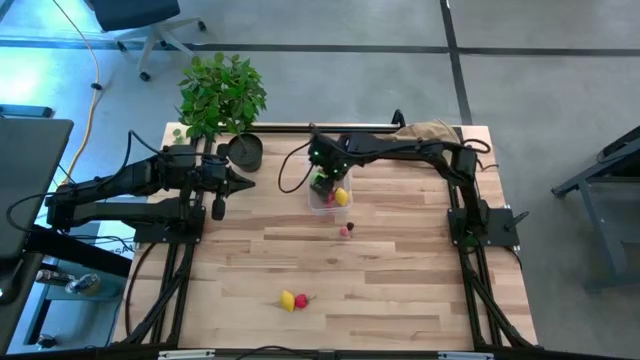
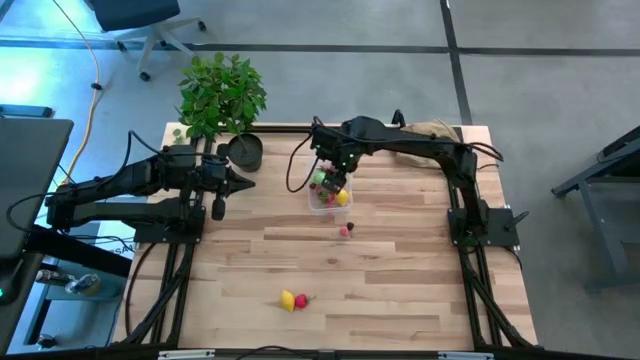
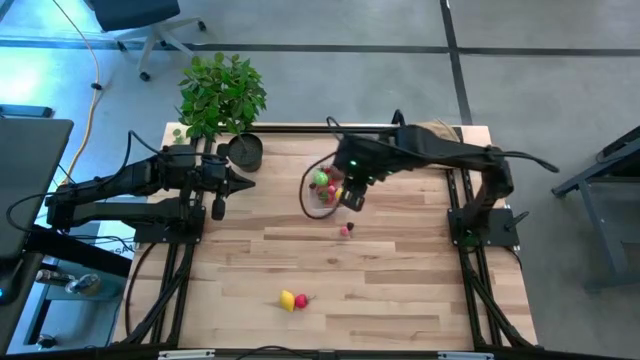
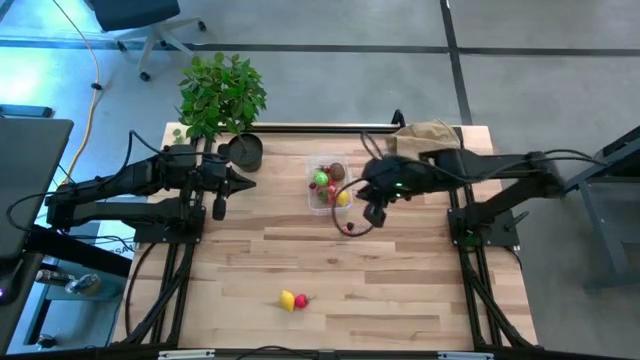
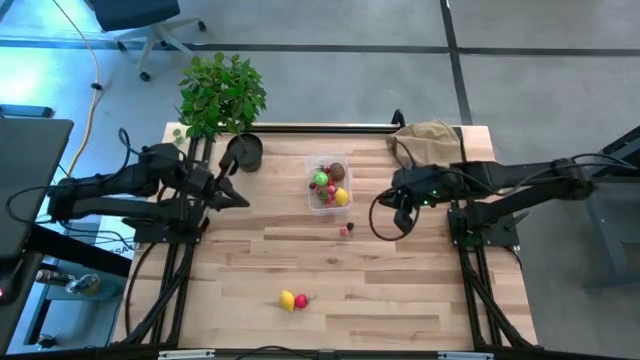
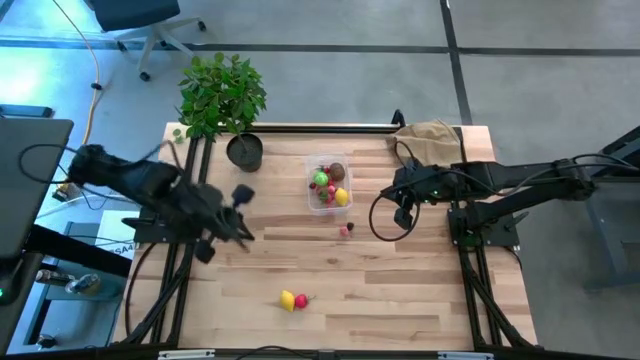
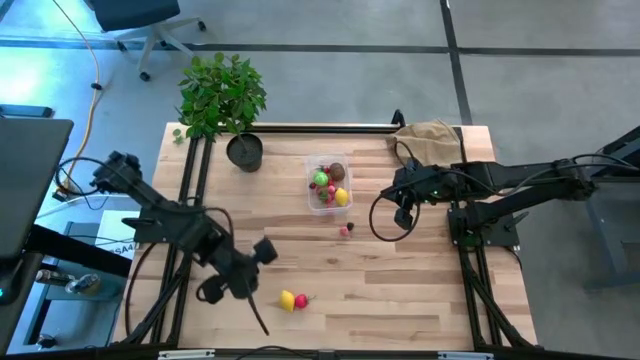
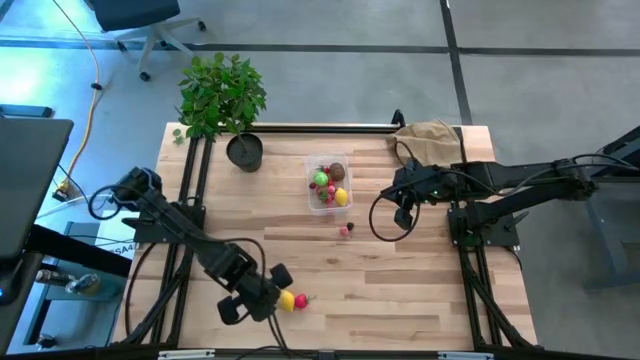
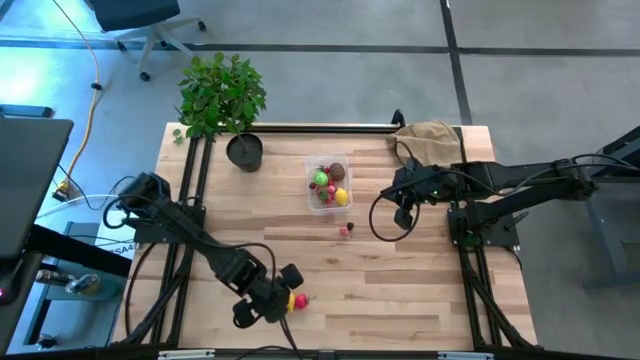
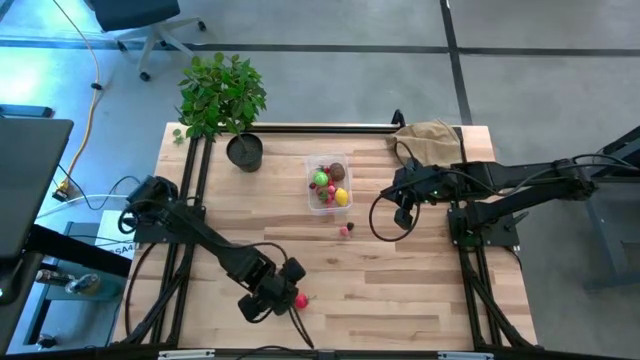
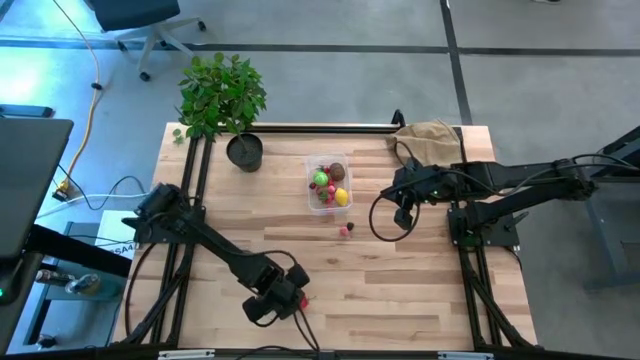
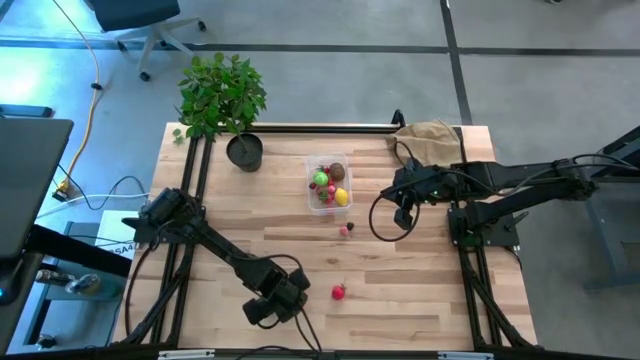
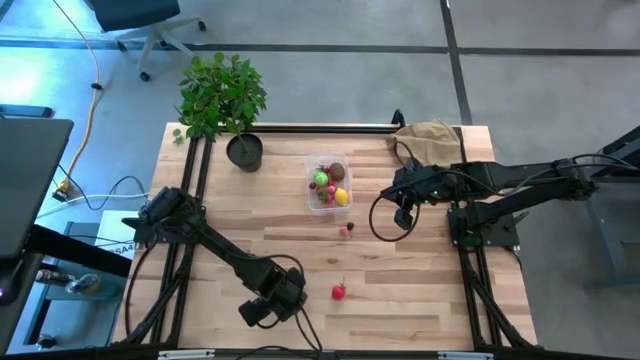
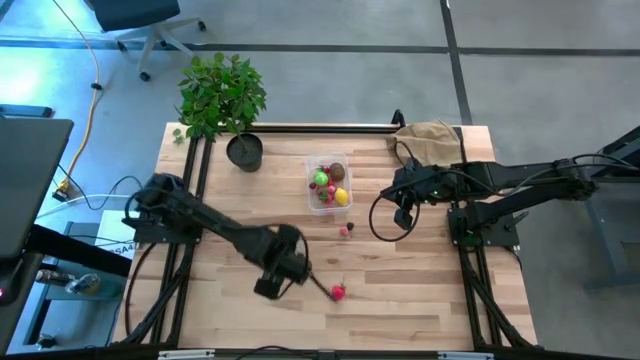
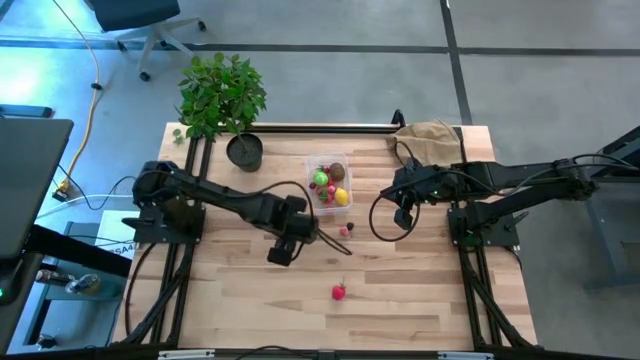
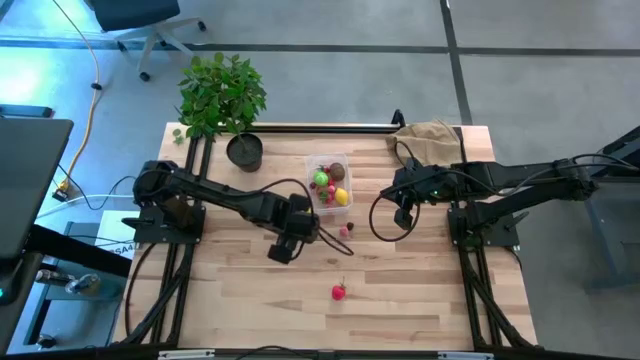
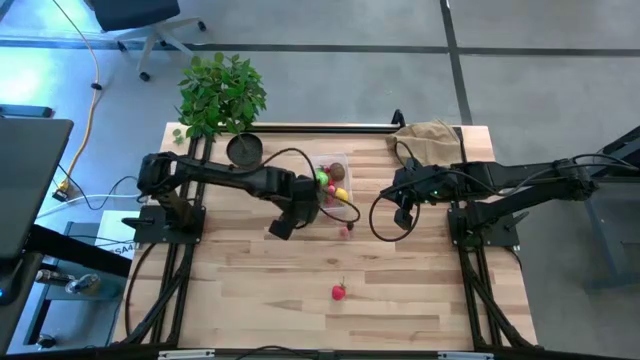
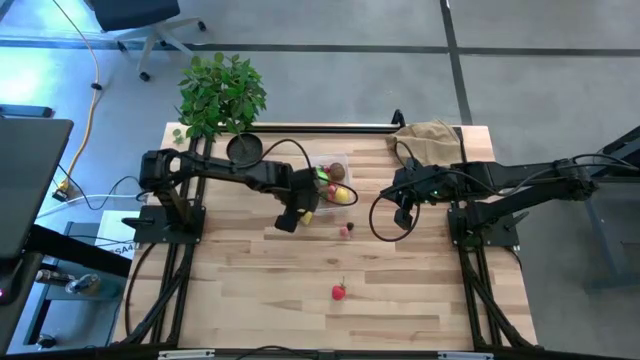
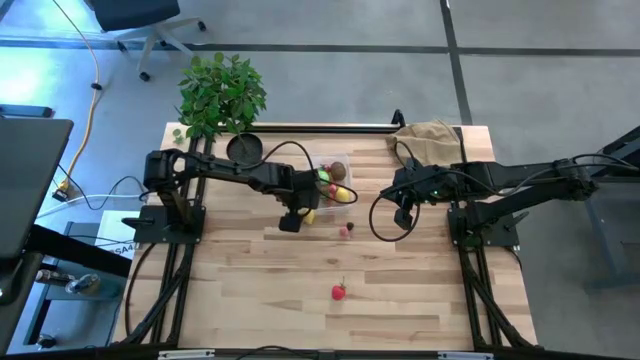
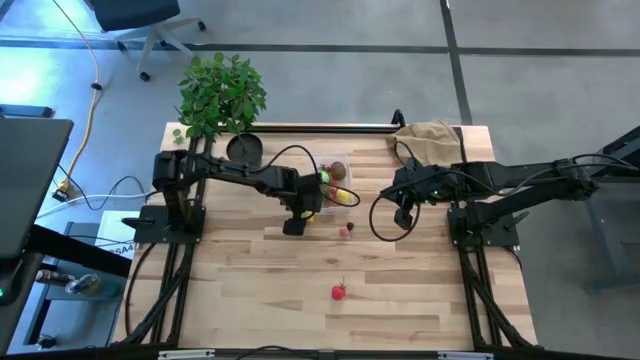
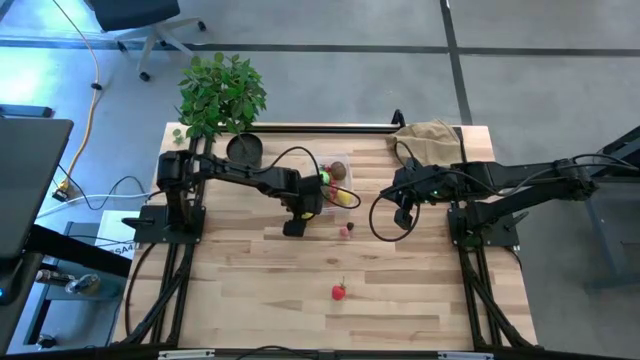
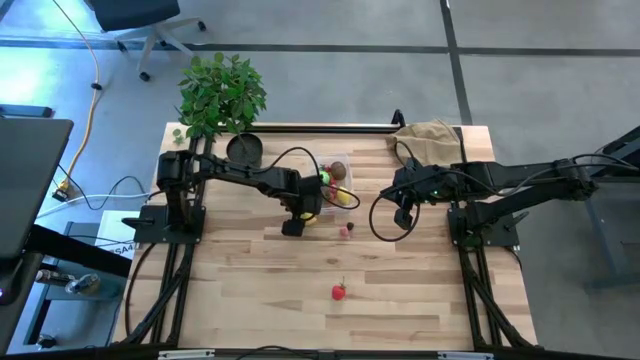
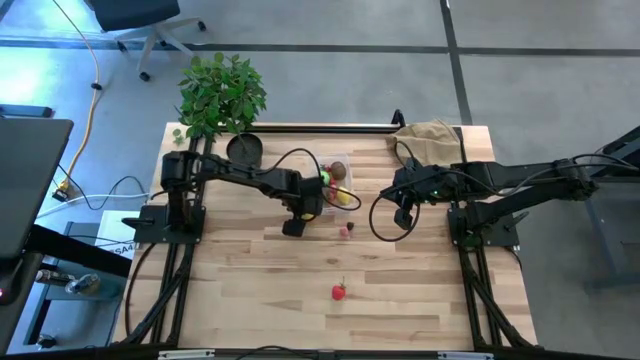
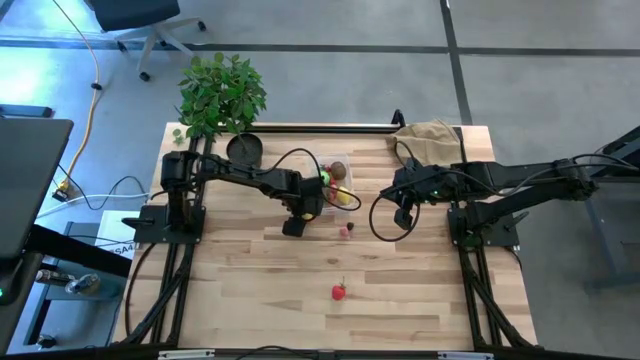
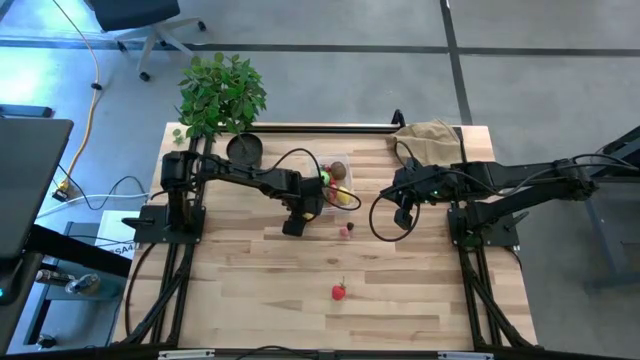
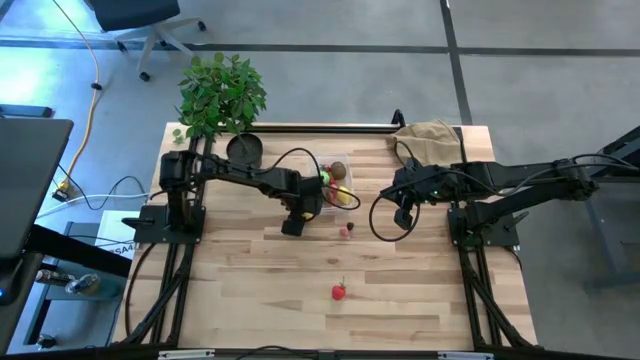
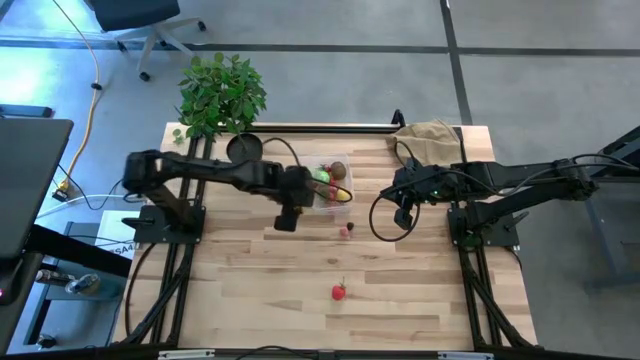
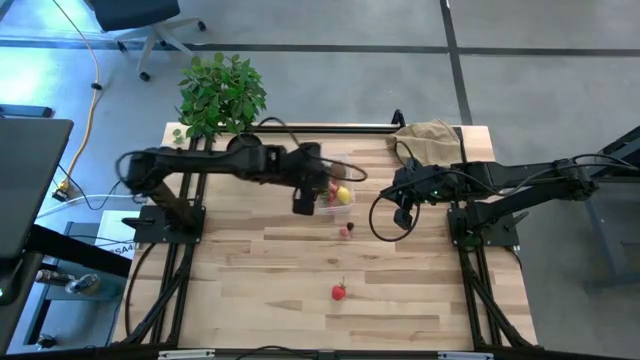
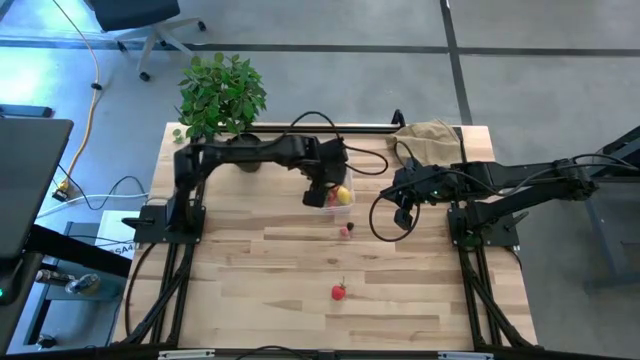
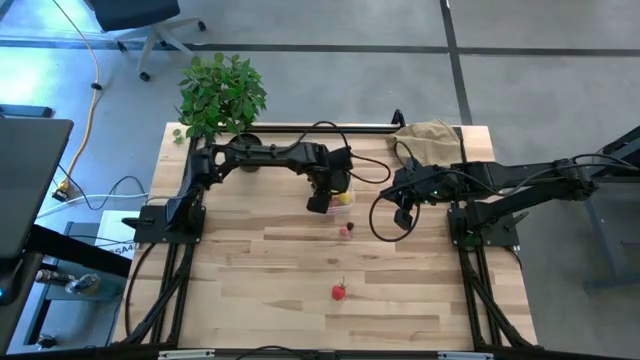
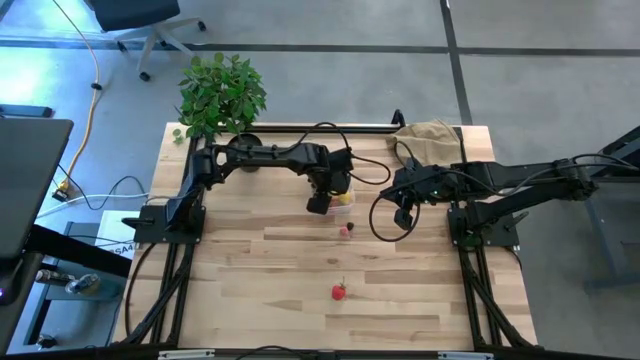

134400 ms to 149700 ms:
Task: Pick and placing Produce into tupperware
Put the yellow lemon into the transparent bin

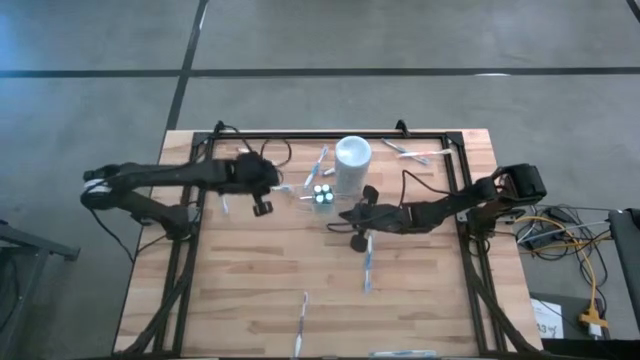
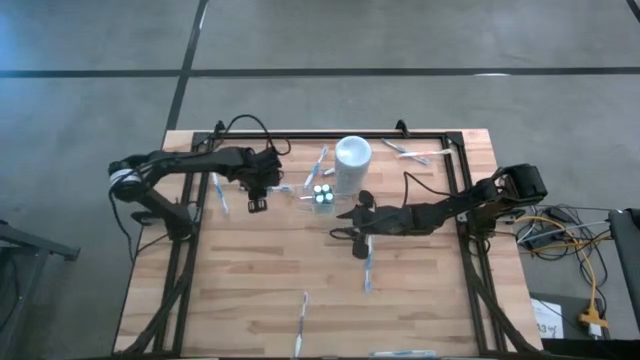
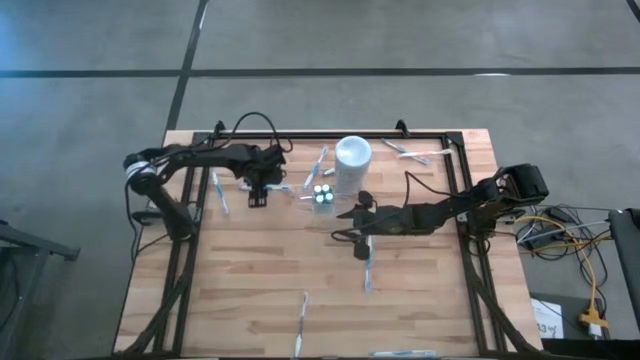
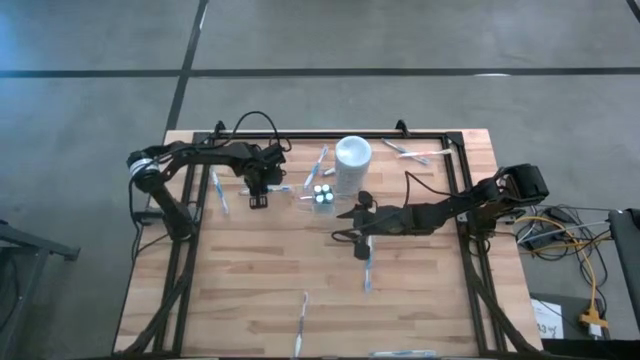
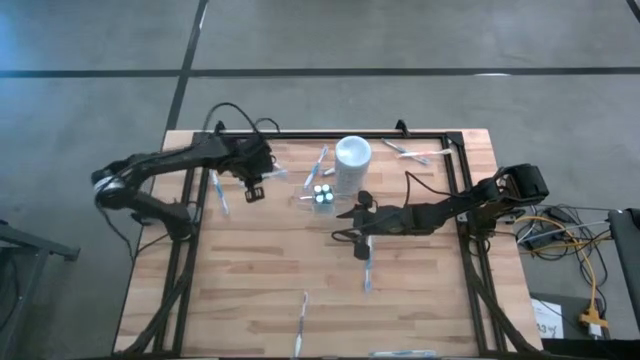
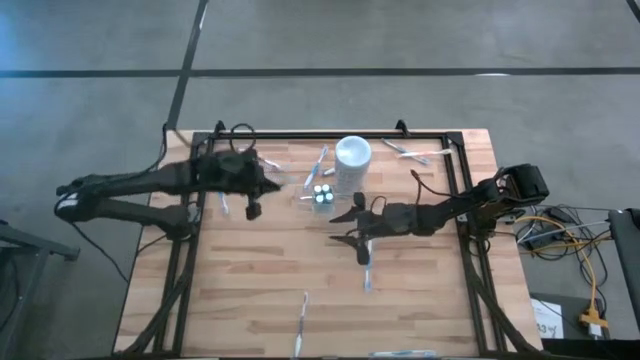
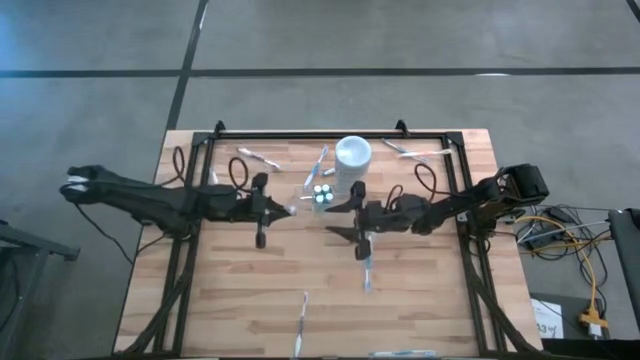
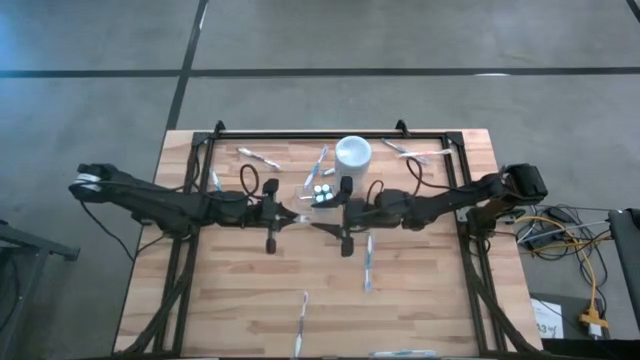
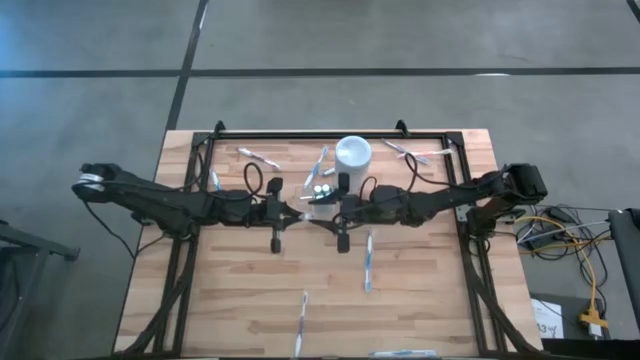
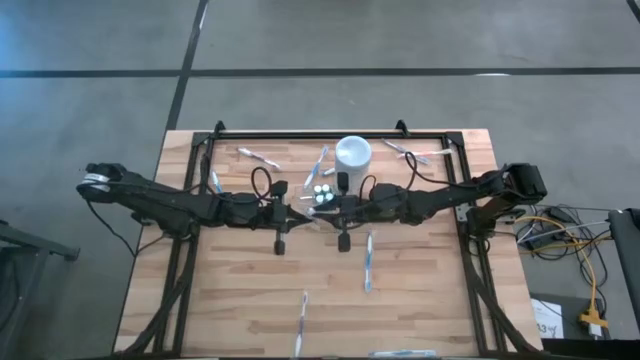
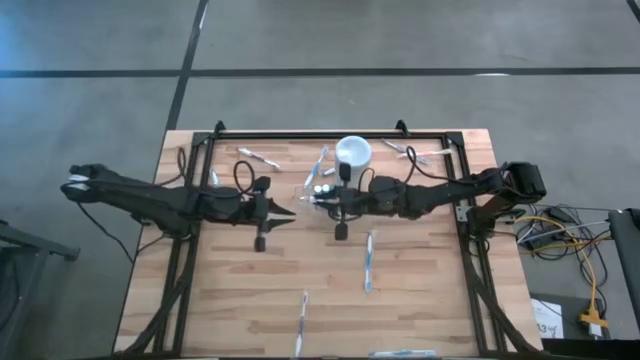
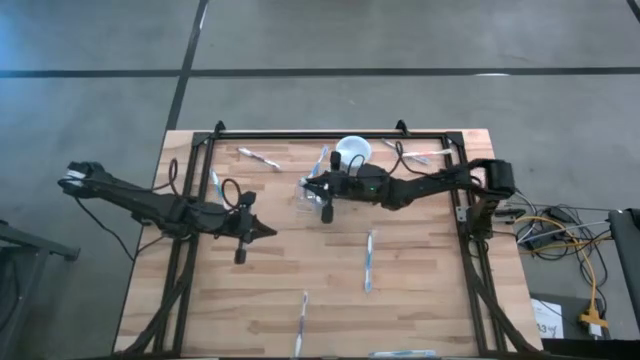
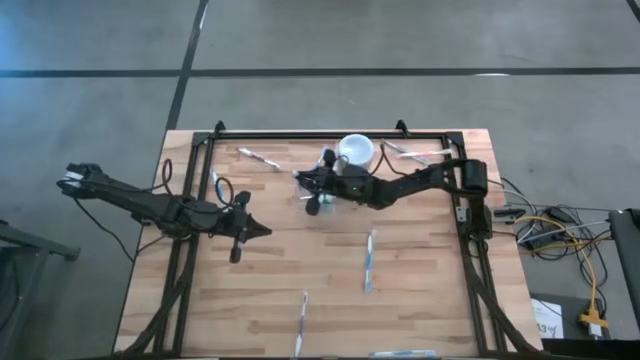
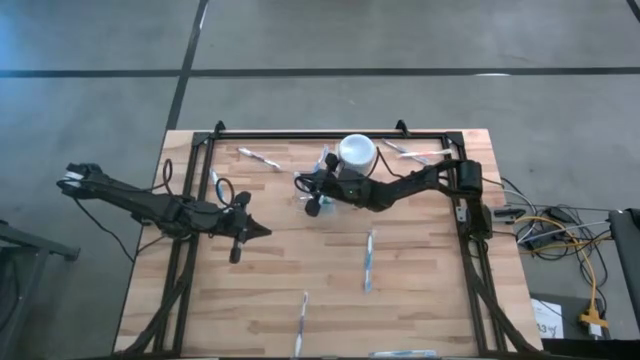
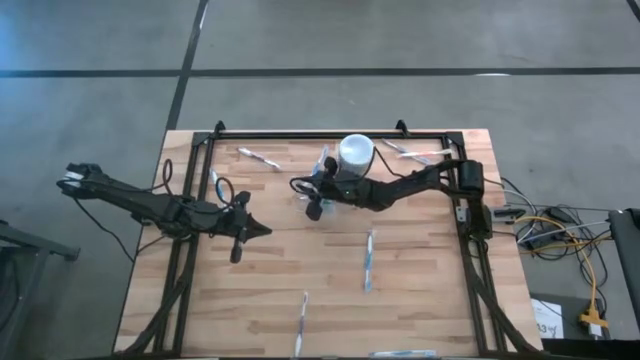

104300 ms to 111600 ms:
Task: Pick & Place toothbrushing station
Put the blue toothbrush into the transparent organizer
